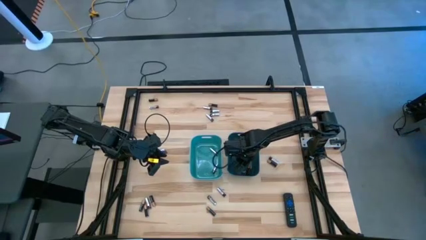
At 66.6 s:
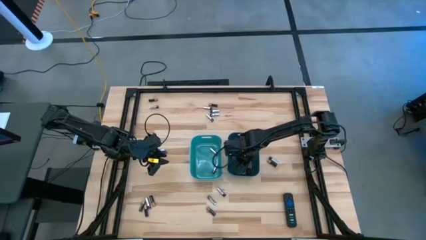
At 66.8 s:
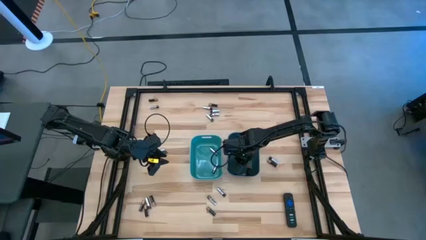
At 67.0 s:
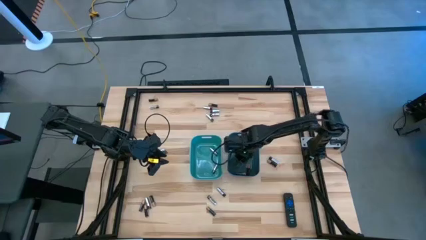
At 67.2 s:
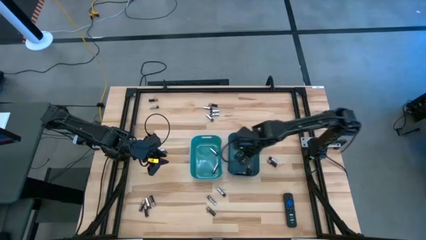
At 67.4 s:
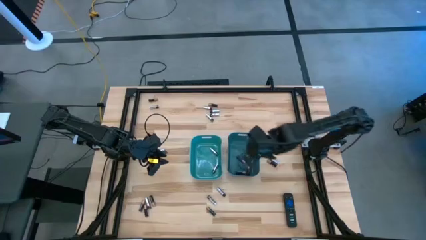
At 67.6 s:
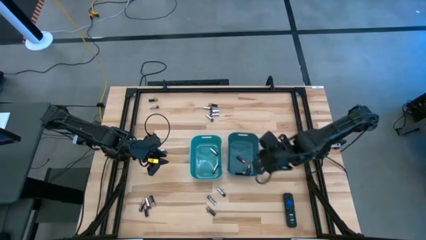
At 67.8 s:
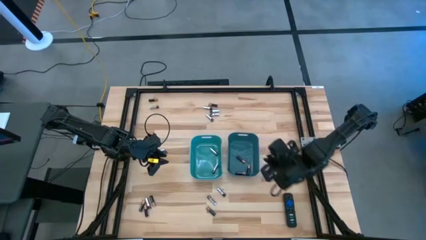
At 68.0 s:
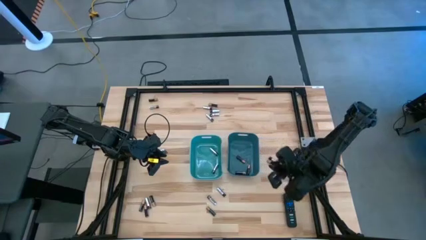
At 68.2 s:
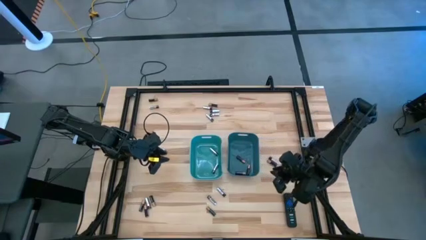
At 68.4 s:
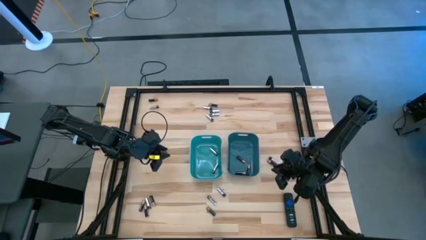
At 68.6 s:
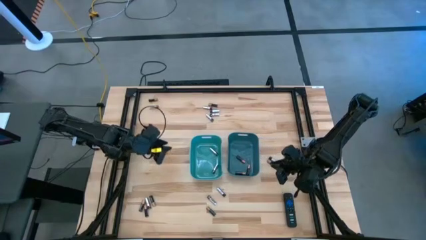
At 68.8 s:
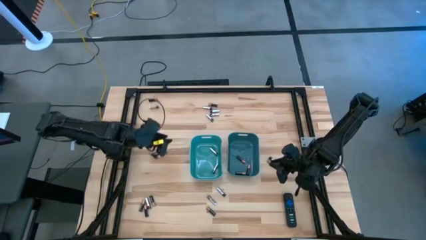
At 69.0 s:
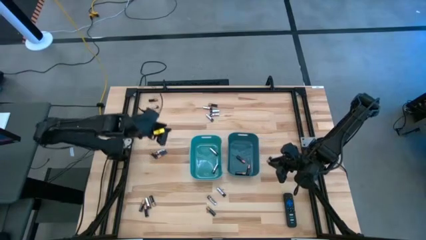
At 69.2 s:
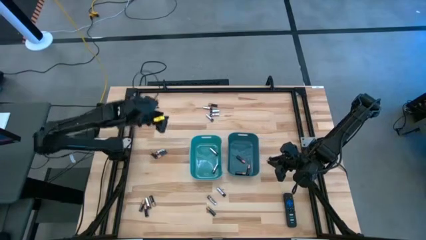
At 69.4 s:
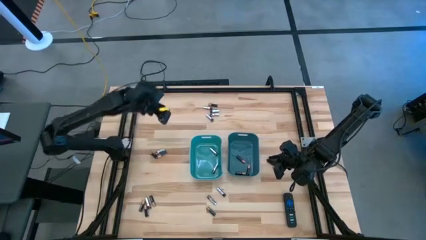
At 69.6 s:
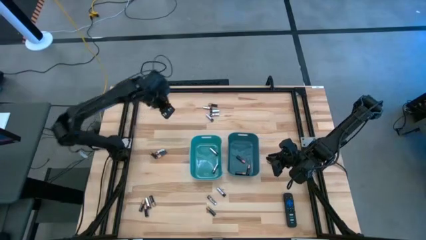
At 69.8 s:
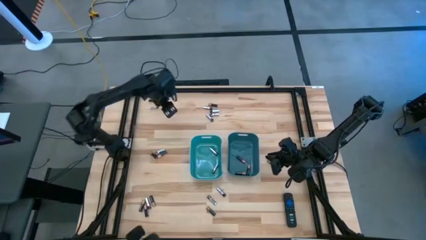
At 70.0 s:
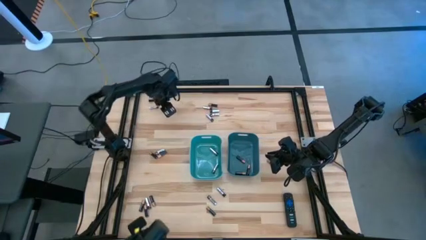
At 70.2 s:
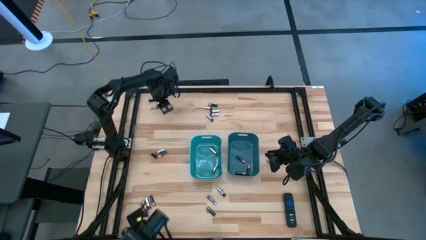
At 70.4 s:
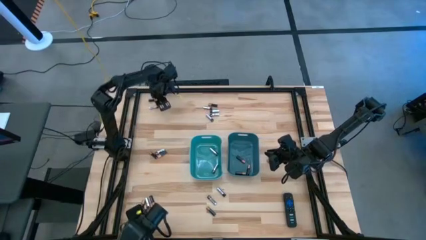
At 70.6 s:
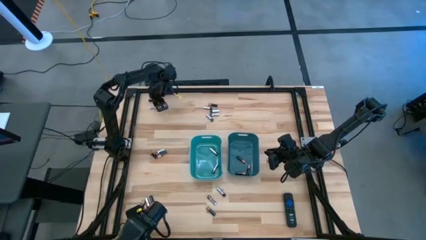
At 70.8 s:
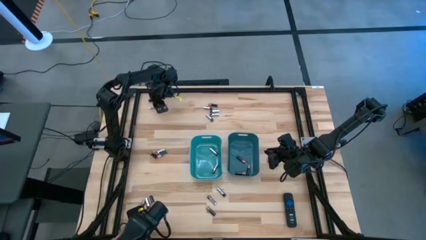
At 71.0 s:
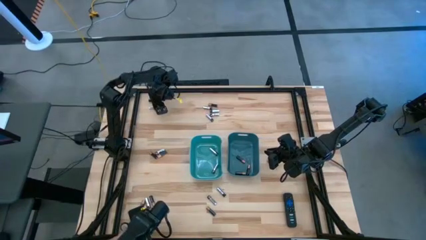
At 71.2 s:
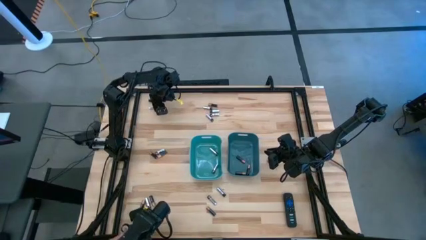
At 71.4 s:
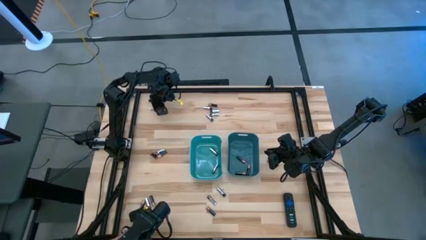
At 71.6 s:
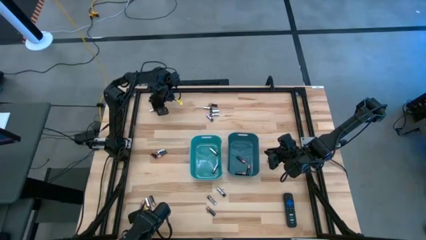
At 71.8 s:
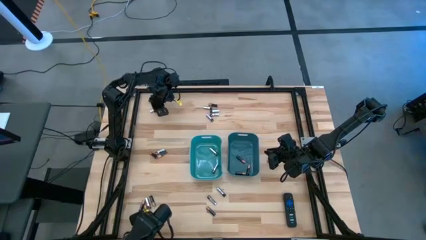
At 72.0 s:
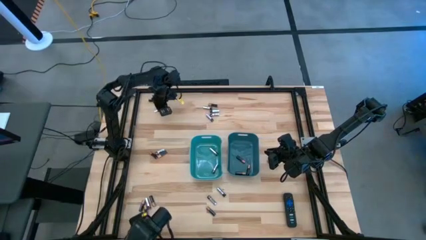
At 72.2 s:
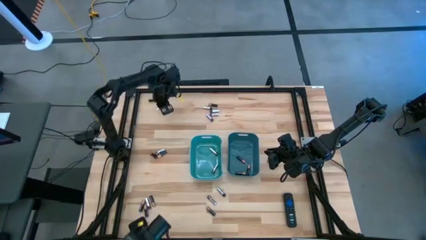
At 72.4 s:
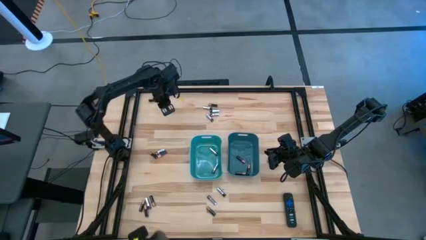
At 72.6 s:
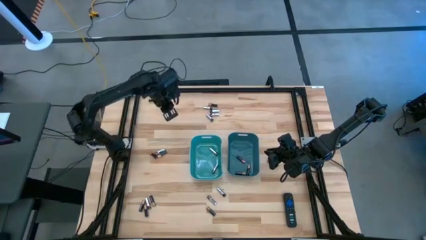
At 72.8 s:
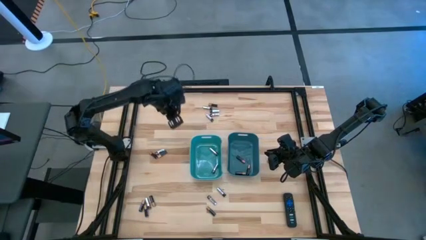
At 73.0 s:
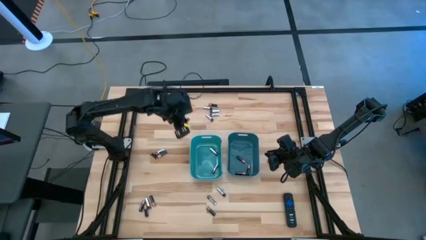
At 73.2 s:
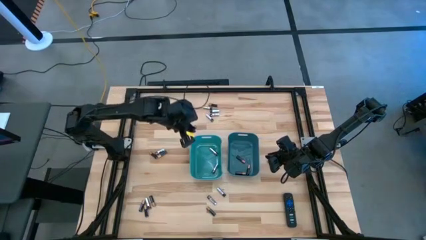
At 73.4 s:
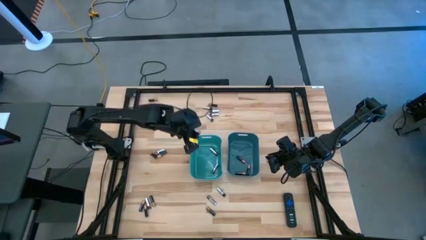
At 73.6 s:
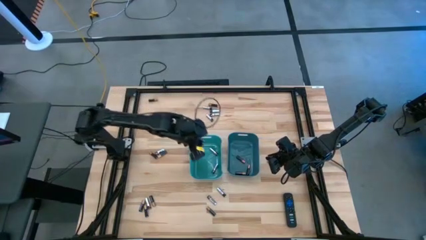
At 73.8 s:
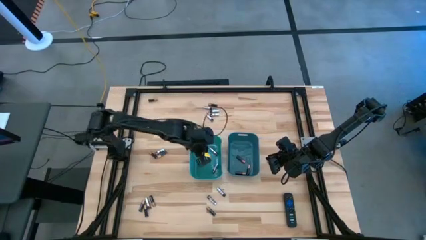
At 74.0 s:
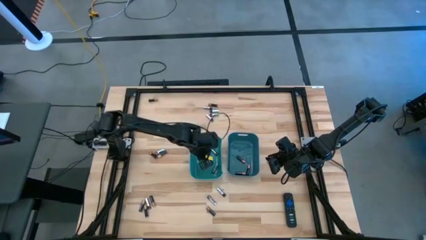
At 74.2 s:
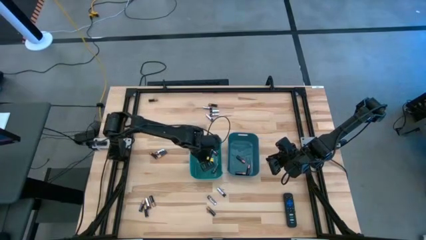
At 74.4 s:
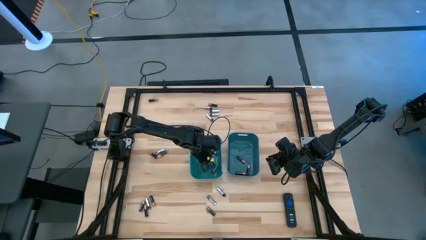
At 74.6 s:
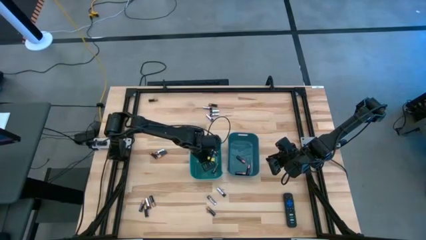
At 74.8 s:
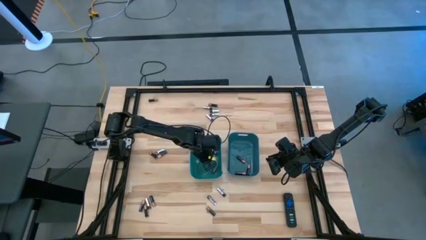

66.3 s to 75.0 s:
Task: Sort batteries
Put the silver battery into the green bin
